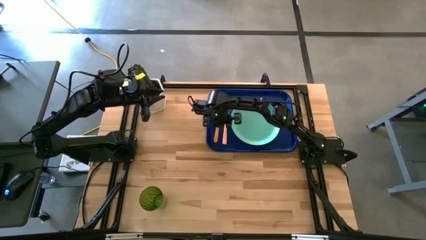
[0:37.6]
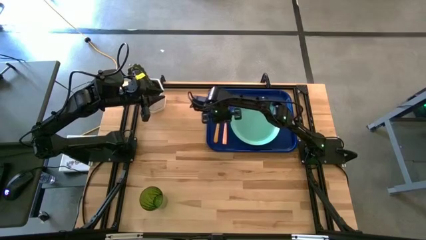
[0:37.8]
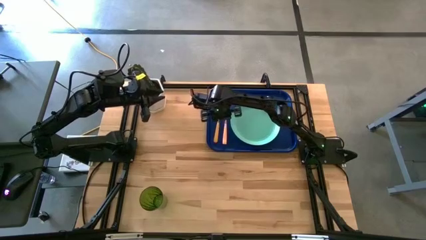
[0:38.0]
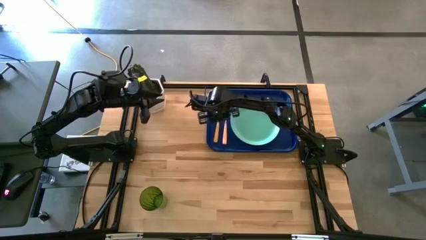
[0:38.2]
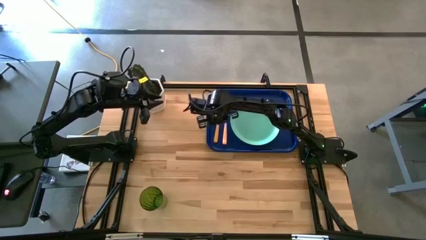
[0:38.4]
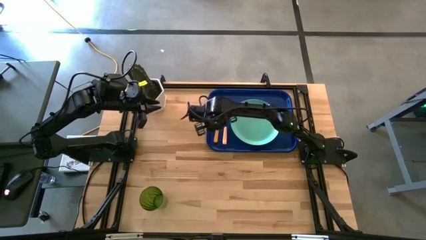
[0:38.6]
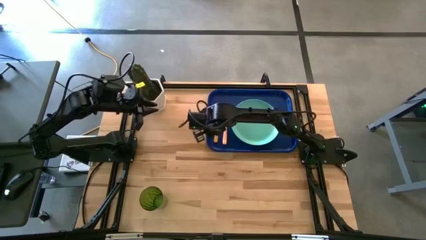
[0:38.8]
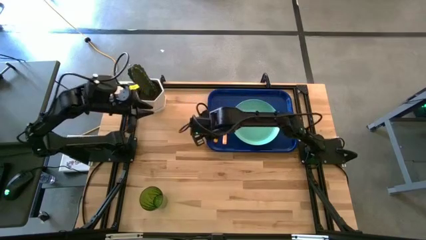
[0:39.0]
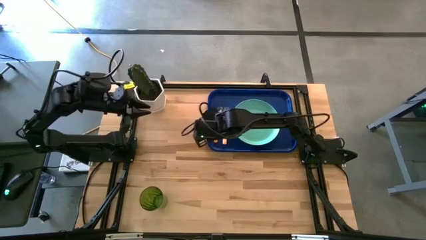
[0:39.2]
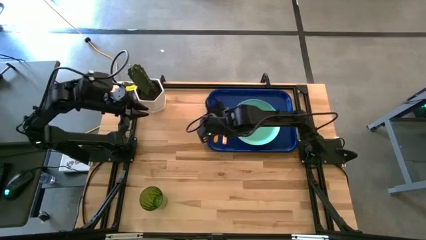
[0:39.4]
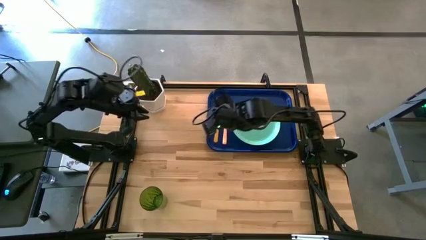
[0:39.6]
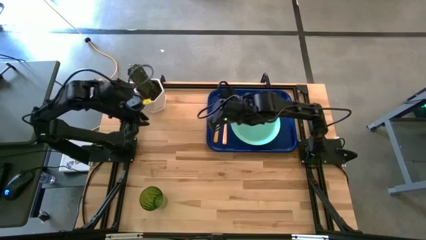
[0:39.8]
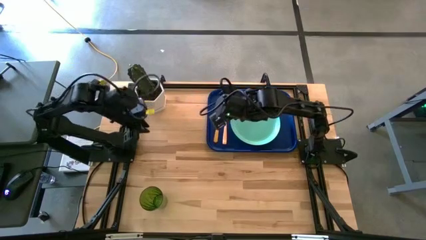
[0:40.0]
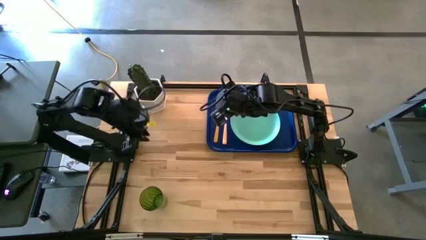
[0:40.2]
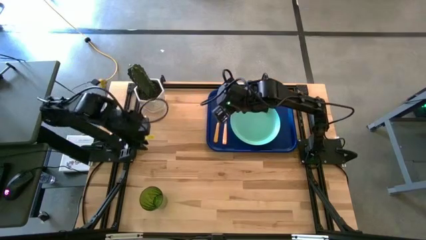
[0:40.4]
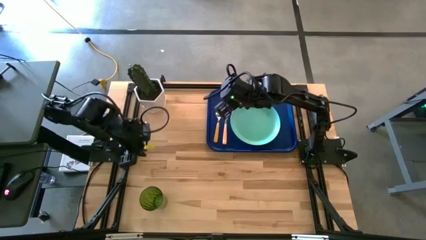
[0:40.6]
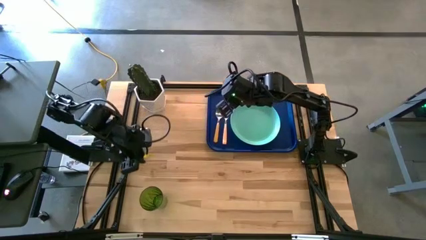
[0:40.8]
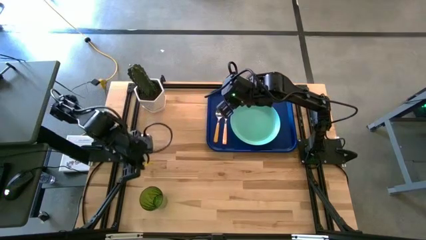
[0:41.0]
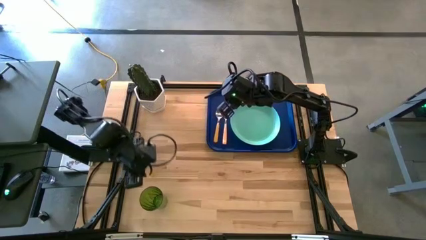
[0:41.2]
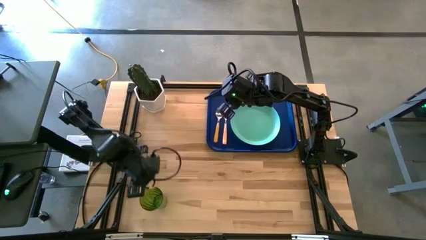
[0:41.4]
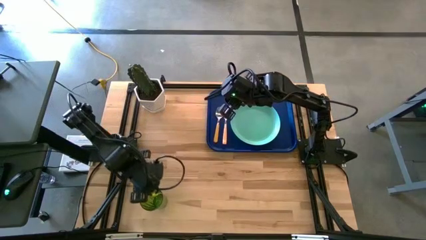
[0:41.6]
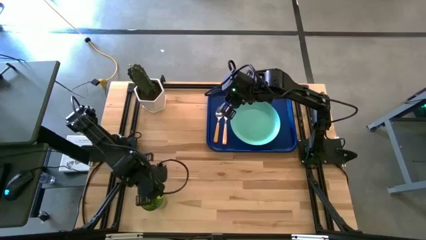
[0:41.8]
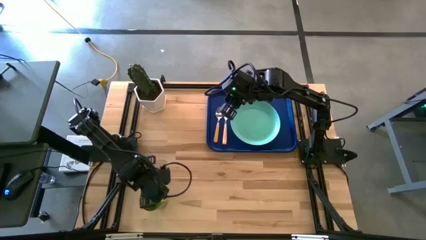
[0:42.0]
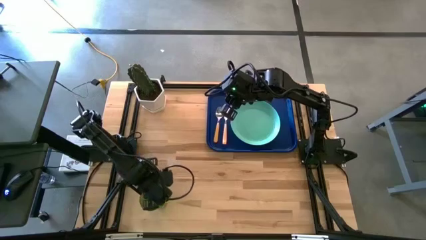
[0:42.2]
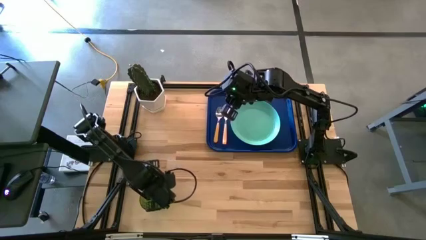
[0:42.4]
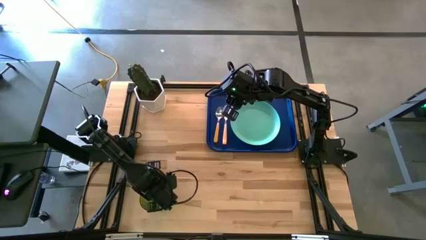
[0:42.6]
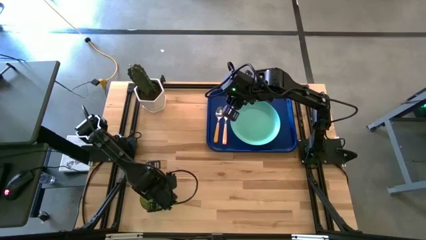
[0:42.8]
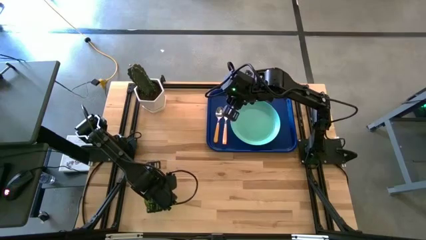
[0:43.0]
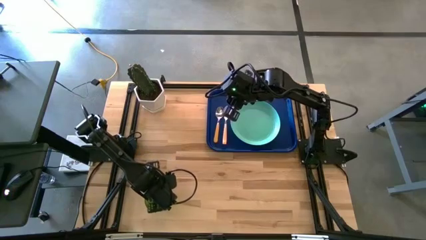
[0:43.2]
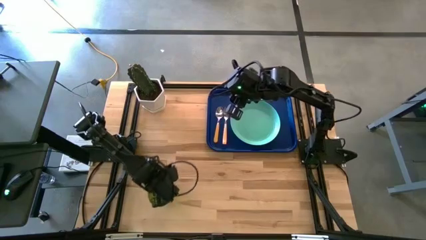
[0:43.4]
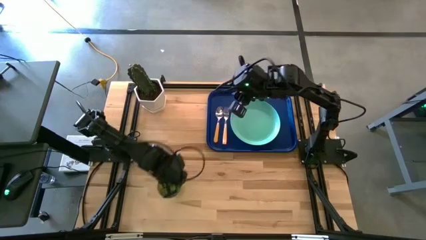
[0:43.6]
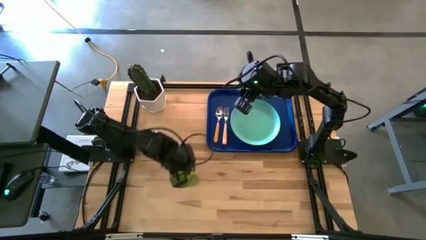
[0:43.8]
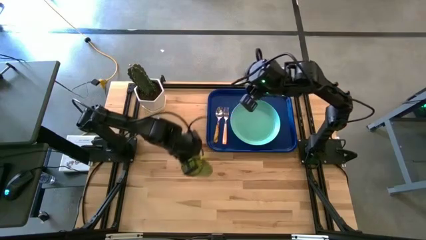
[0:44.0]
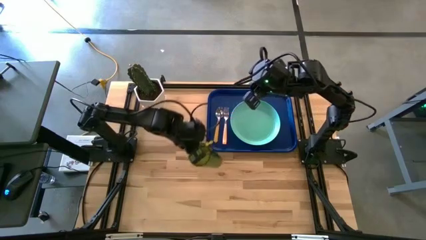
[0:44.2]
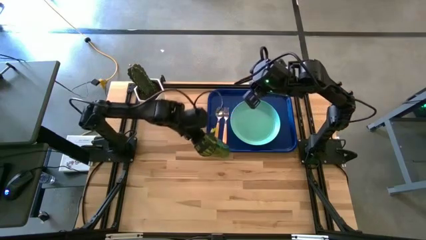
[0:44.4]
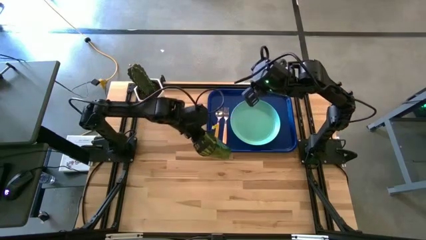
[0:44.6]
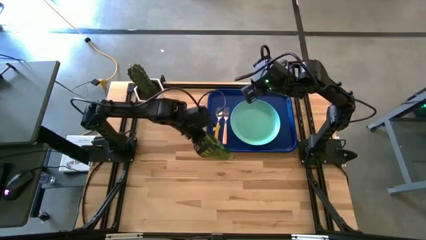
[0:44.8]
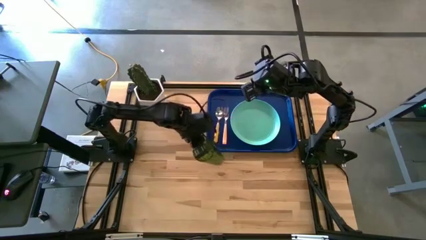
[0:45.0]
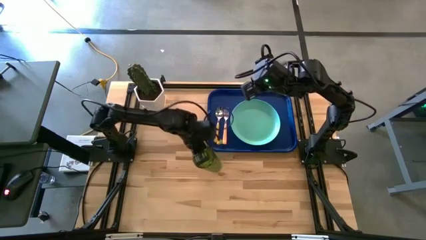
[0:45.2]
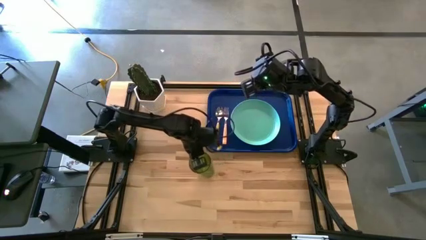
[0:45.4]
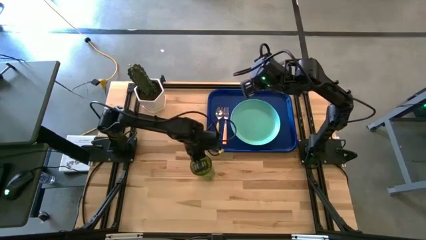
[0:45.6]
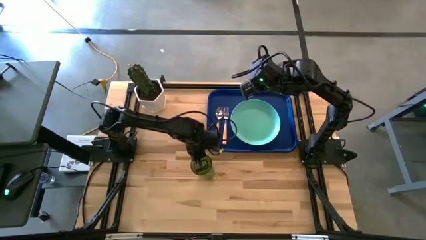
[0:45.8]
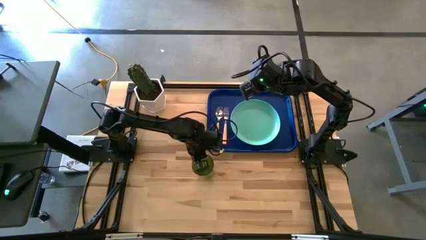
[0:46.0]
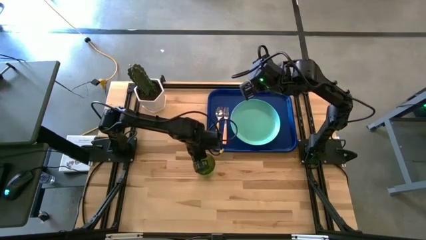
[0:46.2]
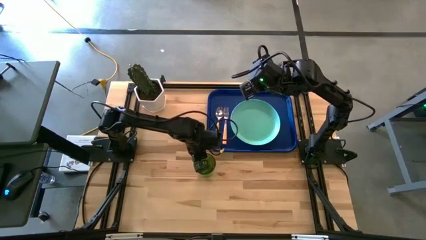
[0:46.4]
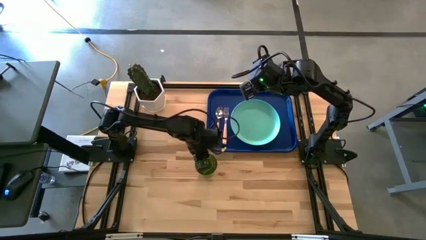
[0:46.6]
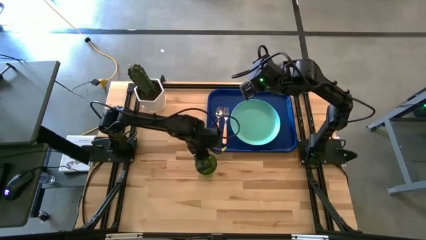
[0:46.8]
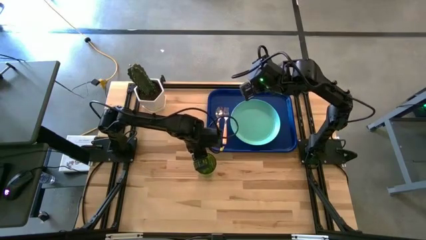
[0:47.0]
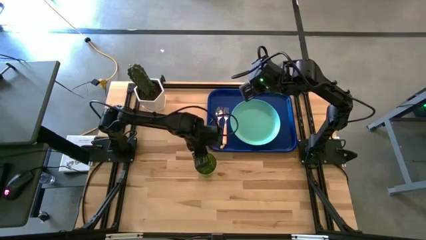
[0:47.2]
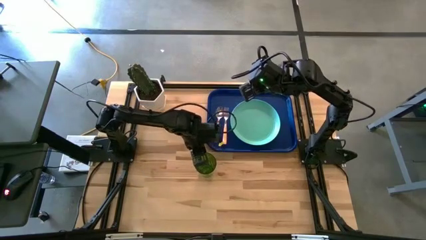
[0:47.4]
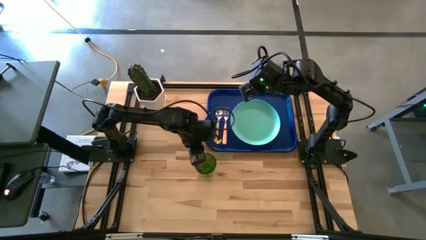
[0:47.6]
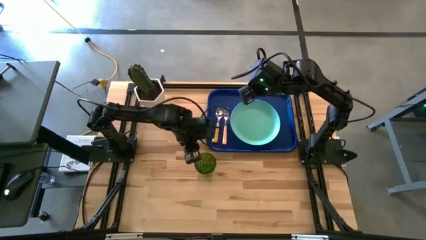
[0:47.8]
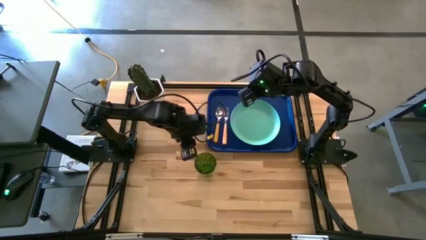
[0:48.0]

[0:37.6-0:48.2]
Task: Pick and place plate/cup/fork/spoon on tray
Put the green cup on the top right side of the light green plate on the blue tray

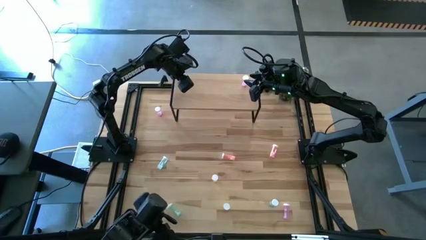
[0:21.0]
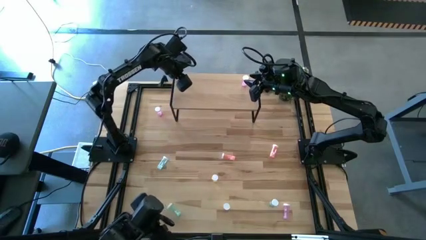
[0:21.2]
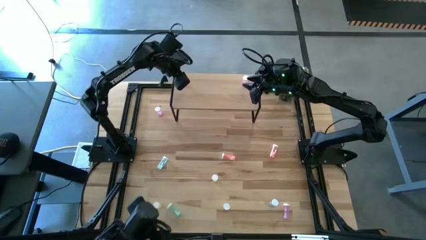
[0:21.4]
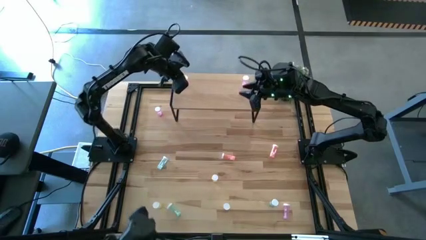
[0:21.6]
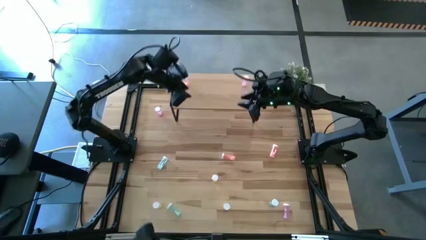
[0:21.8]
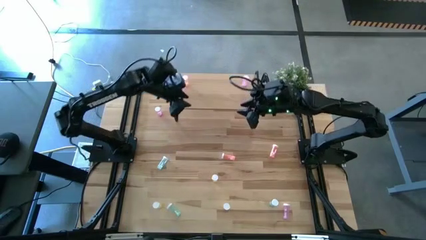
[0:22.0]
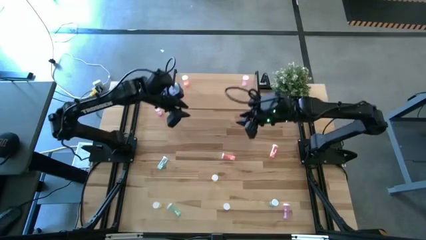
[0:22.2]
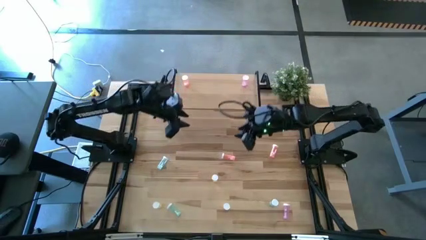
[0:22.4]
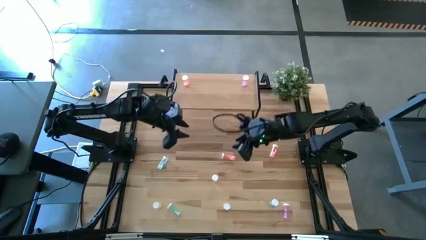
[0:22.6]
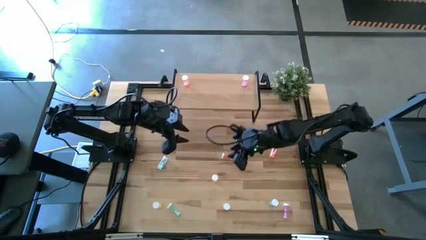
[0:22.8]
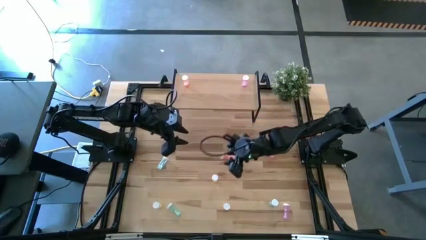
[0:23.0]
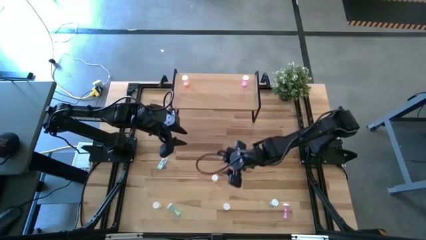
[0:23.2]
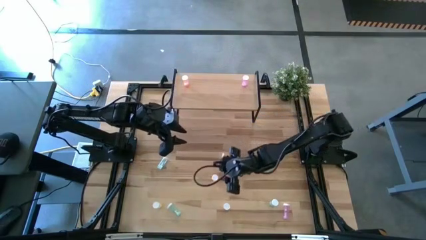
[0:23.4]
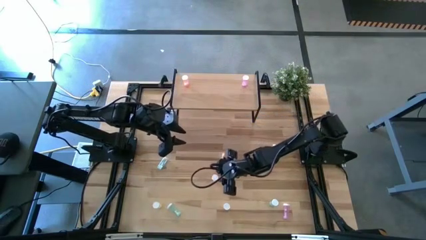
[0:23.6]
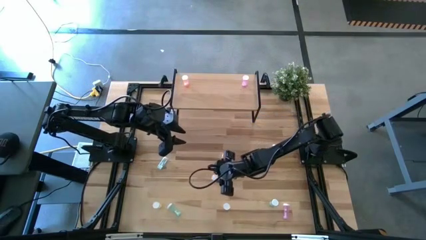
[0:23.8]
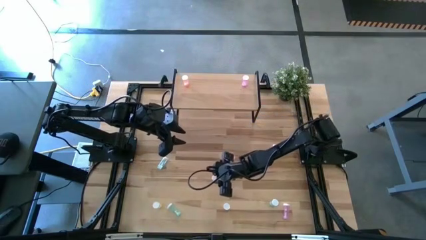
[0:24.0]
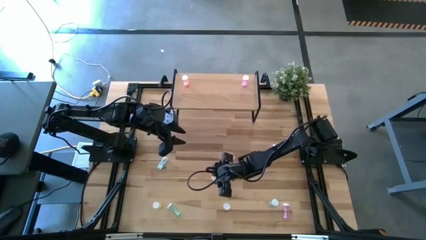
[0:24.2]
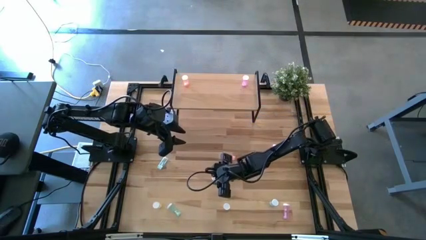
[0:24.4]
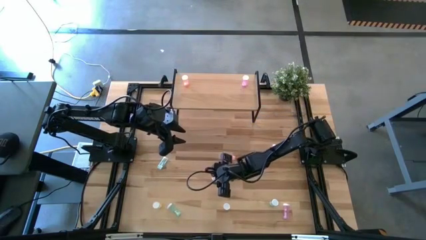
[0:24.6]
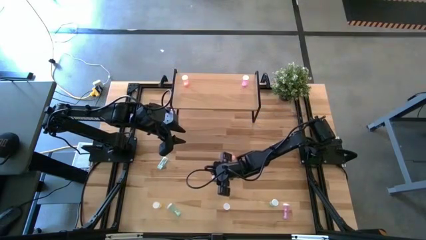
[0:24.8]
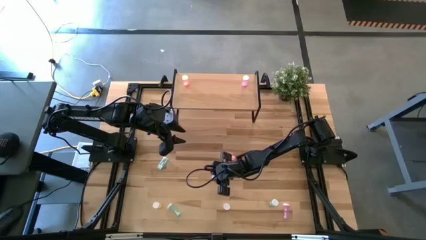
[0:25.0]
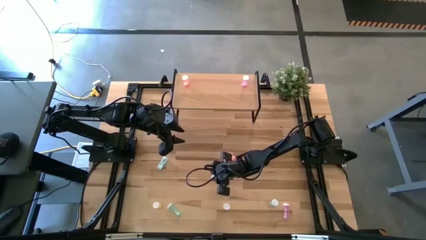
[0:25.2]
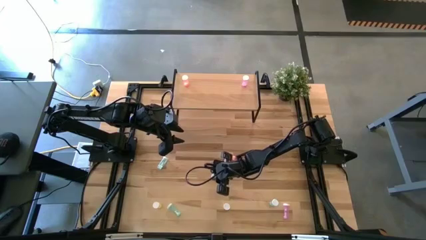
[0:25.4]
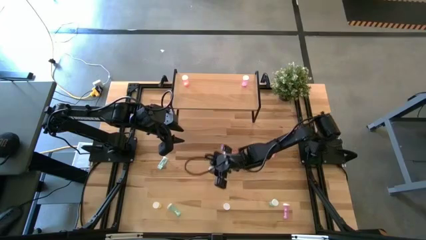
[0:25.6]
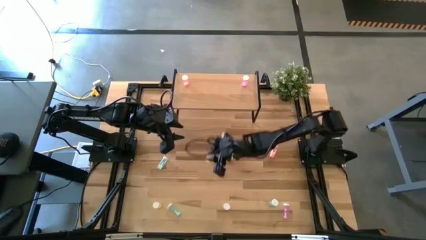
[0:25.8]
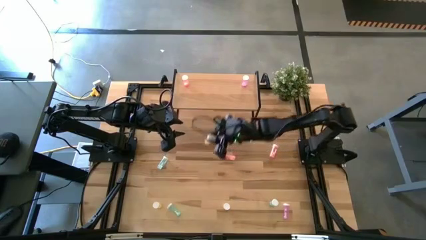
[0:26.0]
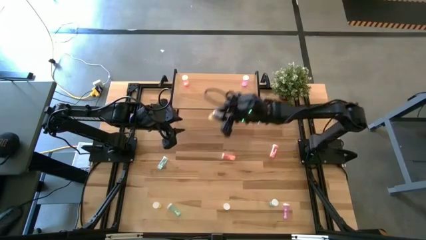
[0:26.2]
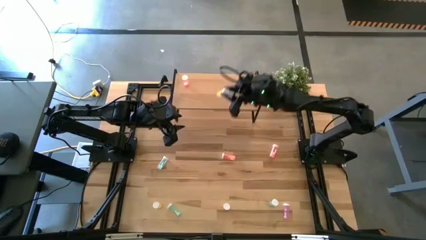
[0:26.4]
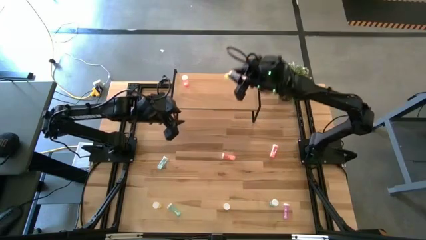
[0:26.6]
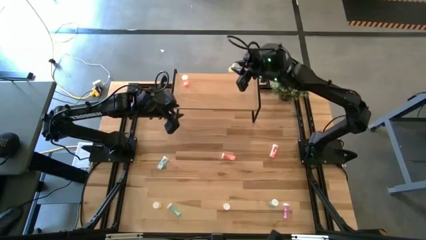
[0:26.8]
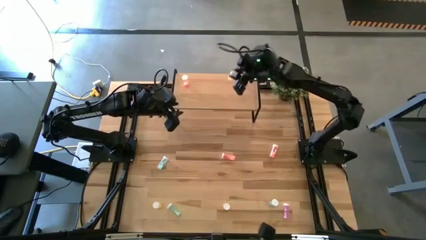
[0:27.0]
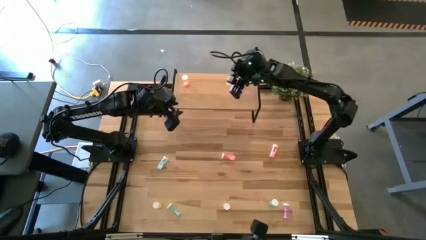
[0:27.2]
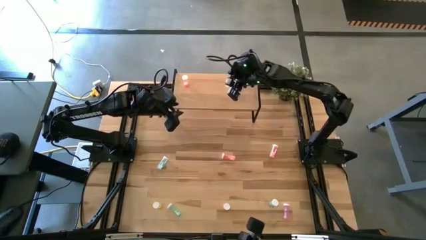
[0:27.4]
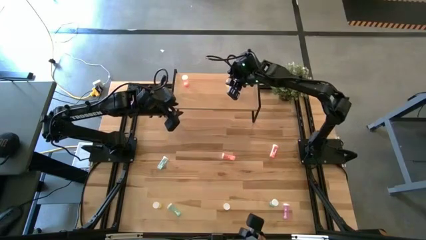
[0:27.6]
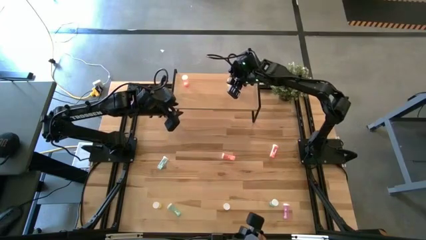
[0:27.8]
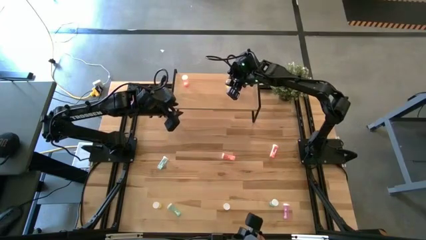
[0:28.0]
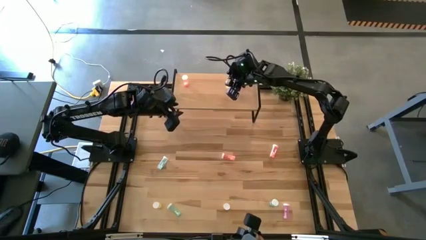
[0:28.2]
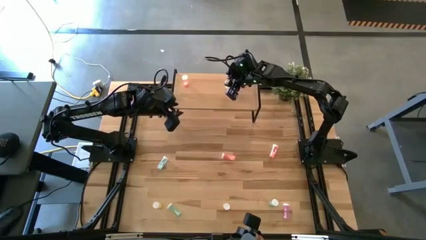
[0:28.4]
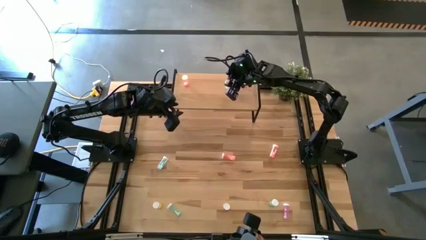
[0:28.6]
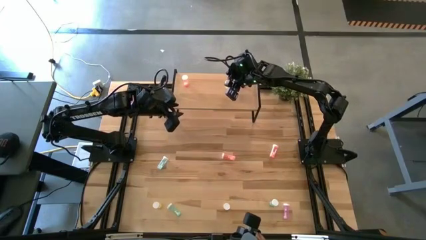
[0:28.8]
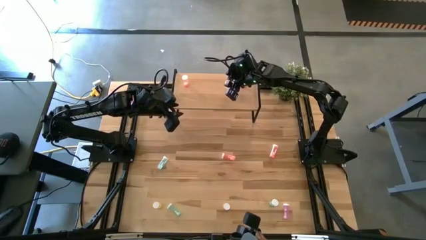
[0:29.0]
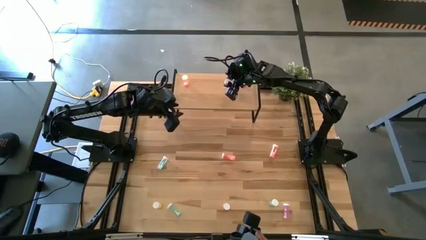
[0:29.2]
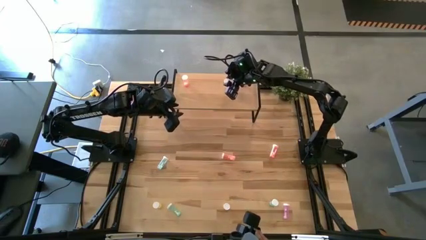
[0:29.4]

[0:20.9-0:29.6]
Task: Pick and place medicine bottles onto shelf by color
Put the top right yellow pill bottle on the shelf
